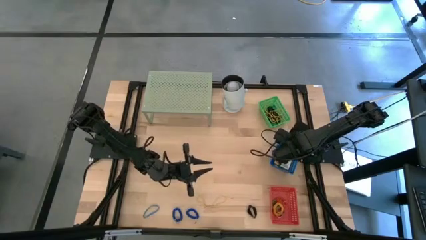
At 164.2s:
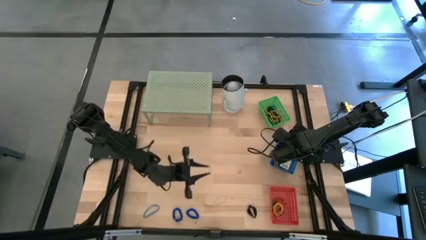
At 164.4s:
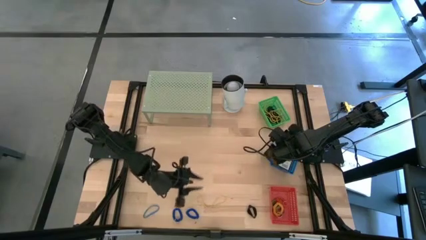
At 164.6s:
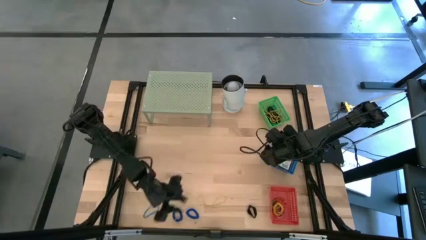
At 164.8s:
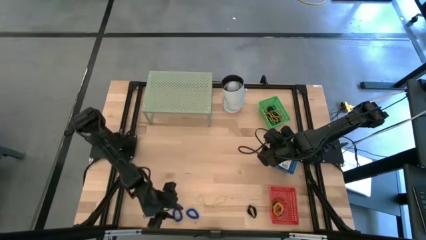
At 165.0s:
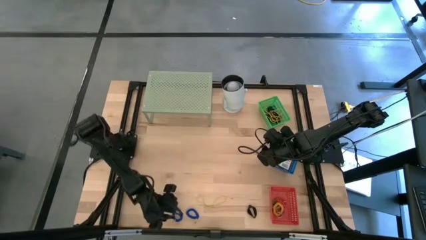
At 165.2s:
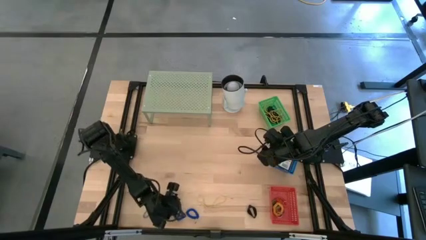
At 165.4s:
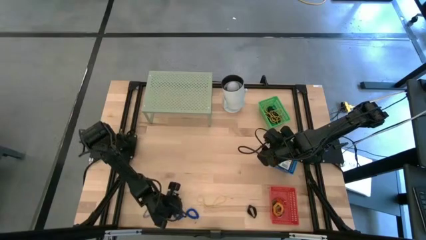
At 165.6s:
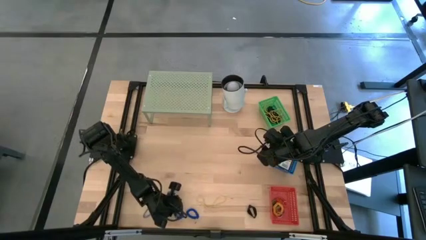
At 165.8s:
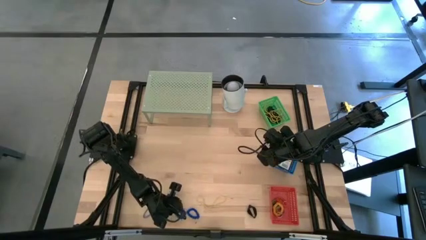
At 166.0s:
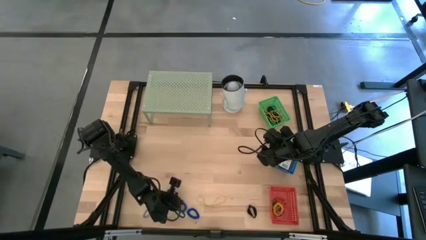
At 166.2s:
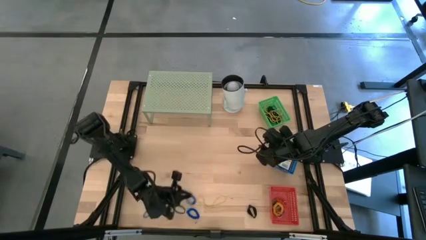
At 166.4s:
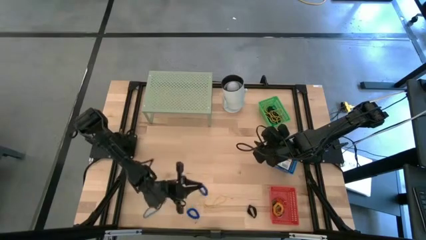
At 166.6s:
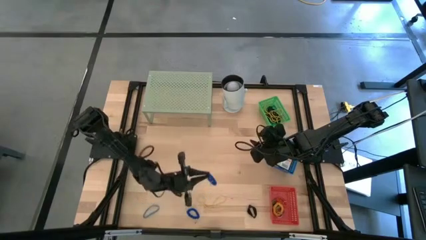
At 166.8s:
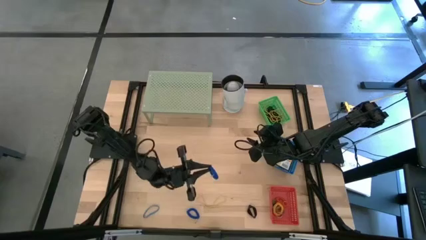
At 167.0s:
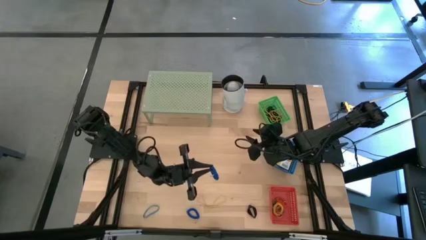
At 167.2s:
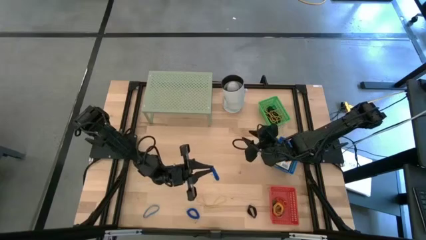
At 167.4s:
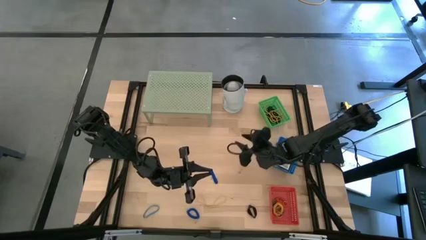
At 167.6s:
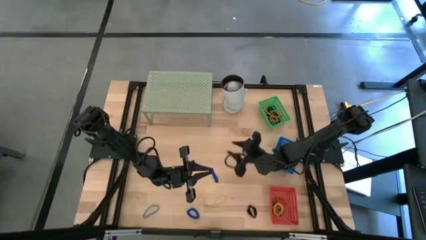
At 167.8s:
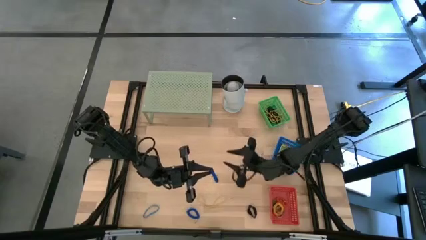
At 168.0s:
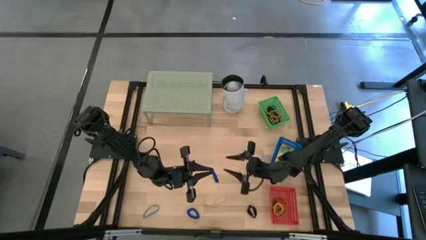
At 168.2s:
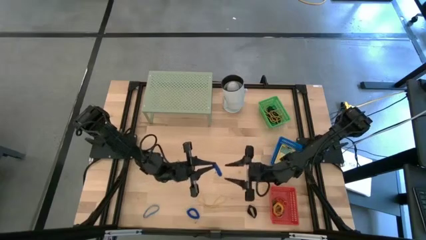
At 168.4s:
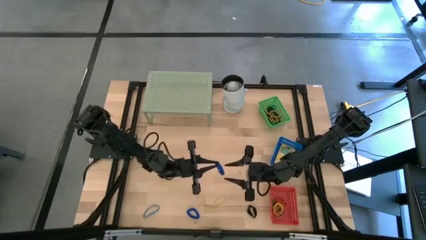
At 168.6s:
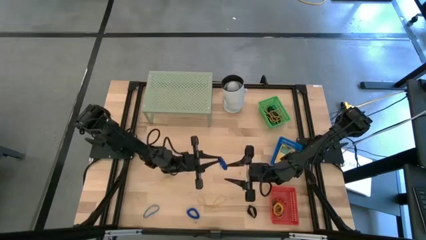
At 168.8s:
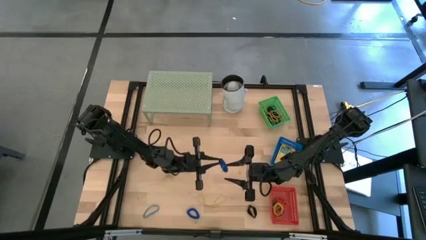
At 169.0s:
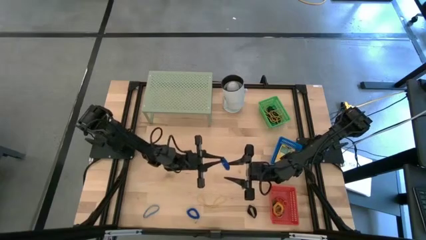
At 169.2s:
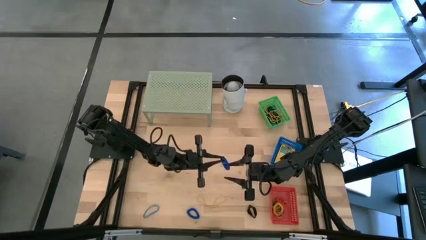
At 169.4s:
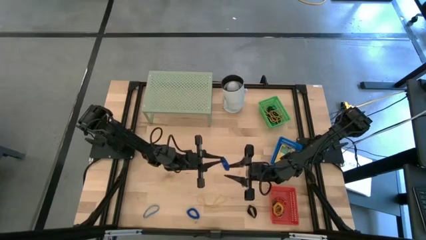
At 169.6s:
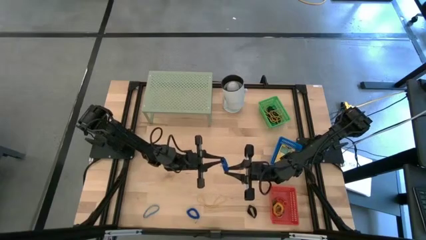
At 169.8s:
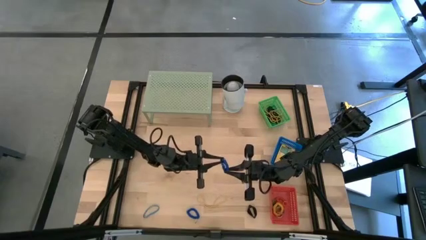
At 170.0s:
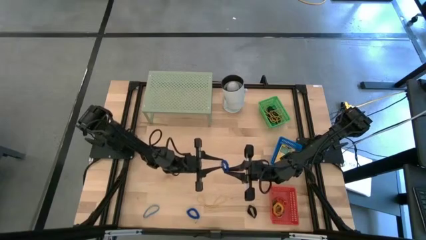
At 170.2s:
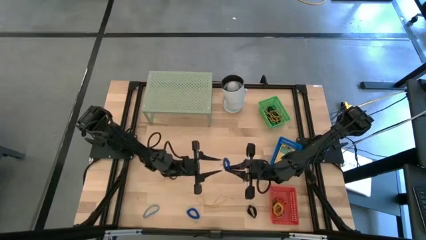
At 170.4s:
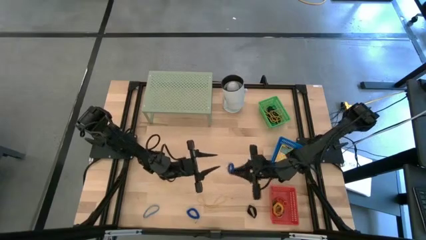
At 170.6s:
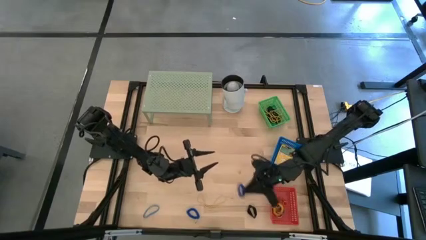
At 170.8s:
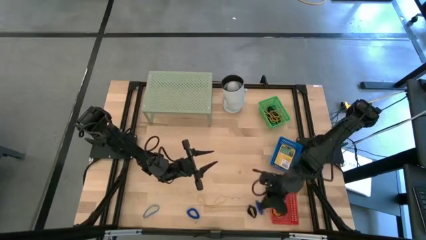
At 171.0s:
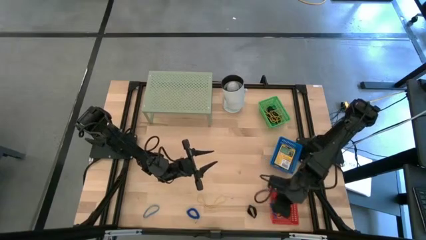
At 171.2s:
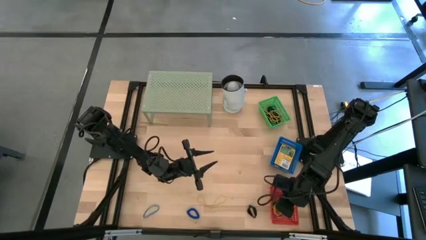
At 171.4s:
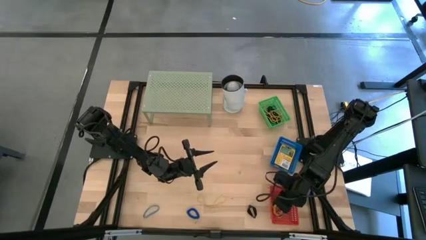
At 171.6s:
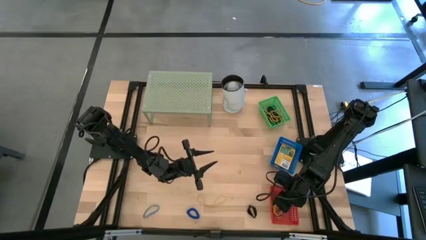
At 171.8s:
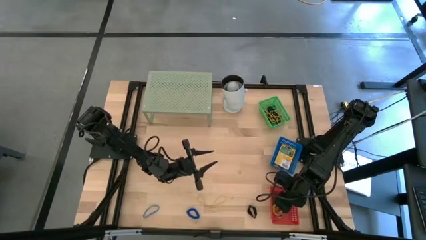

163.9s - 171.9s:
Task: Pick & Place Office Desk Supplies
Put the blue spiral keychain into the red bin

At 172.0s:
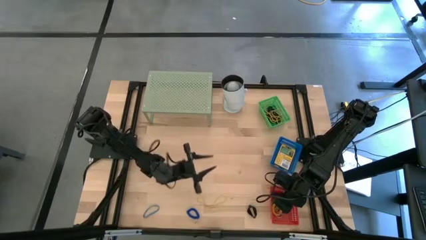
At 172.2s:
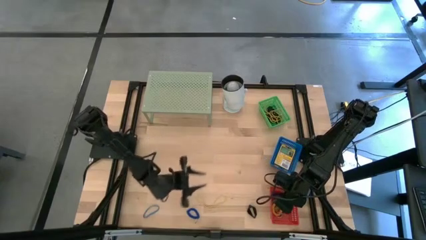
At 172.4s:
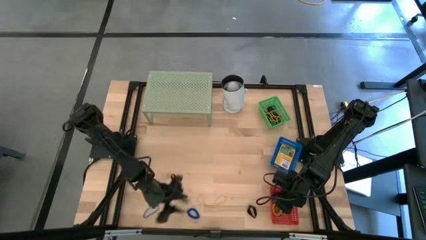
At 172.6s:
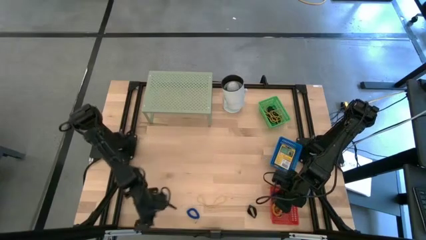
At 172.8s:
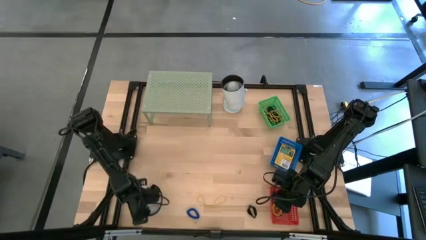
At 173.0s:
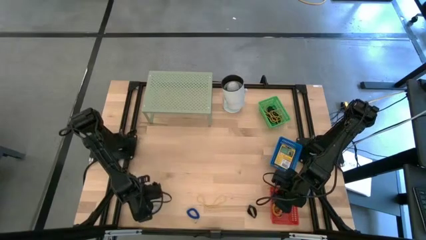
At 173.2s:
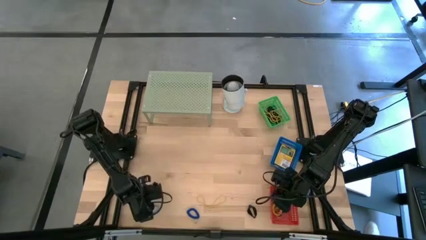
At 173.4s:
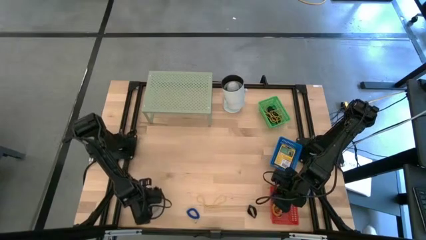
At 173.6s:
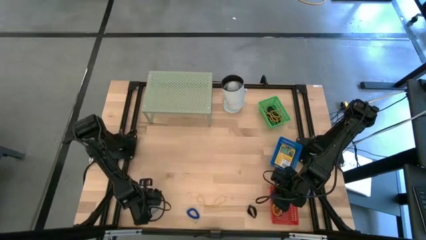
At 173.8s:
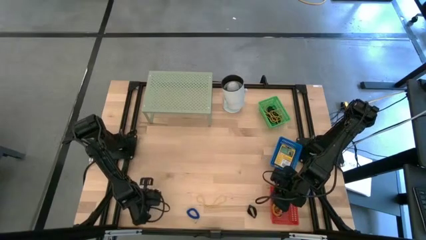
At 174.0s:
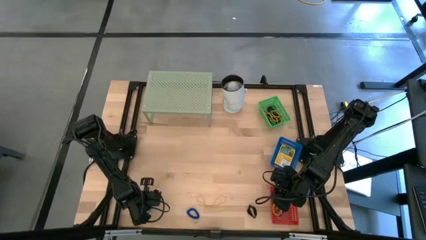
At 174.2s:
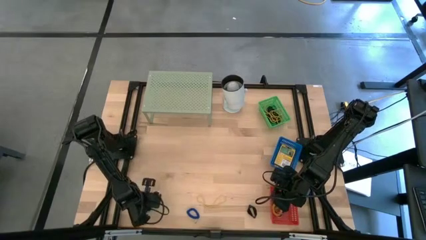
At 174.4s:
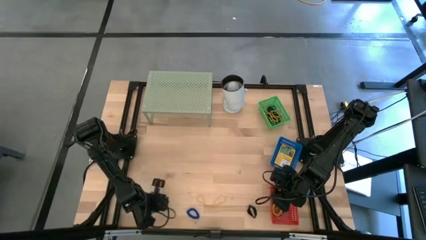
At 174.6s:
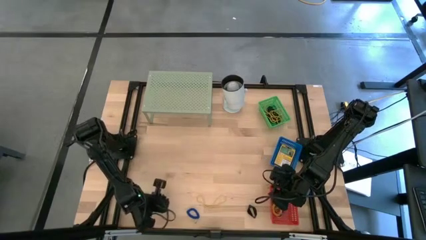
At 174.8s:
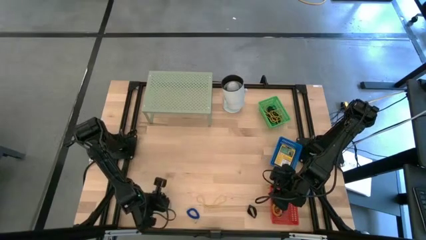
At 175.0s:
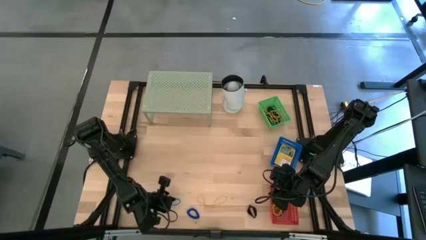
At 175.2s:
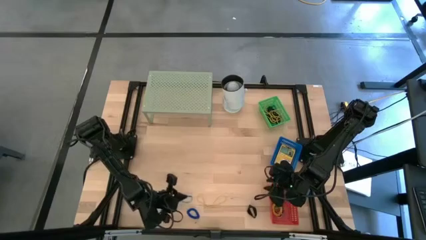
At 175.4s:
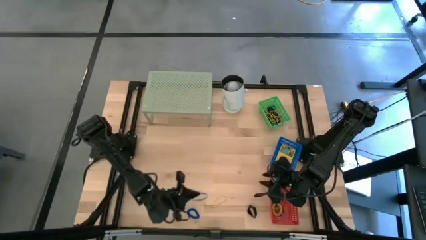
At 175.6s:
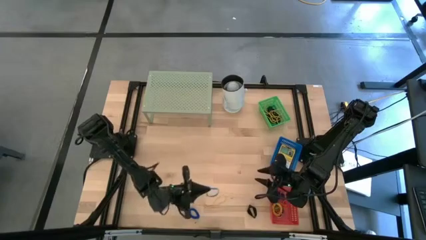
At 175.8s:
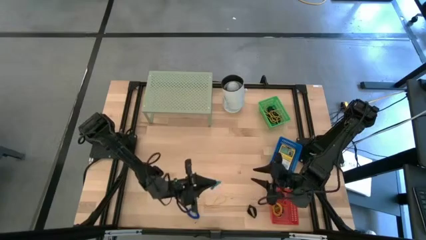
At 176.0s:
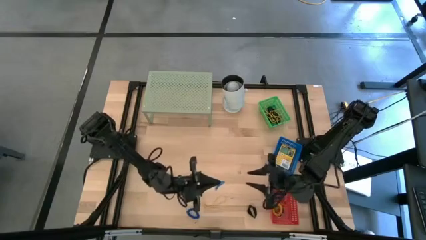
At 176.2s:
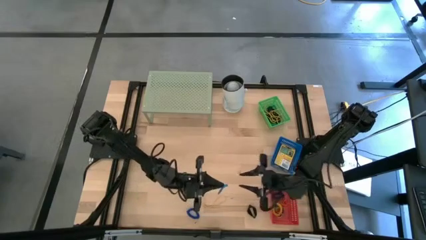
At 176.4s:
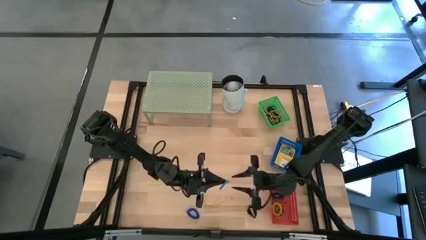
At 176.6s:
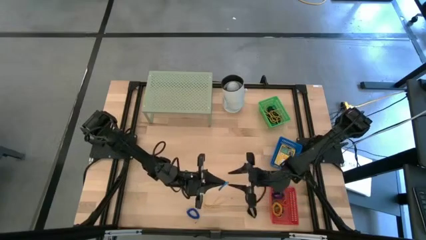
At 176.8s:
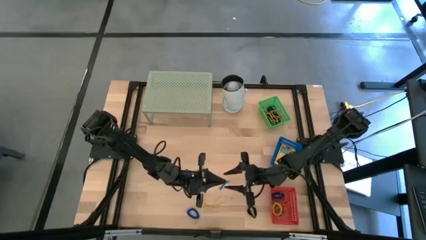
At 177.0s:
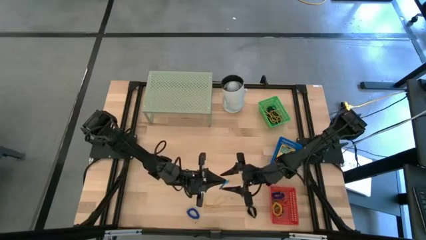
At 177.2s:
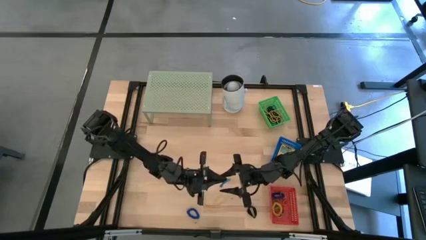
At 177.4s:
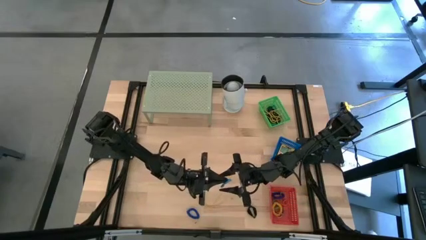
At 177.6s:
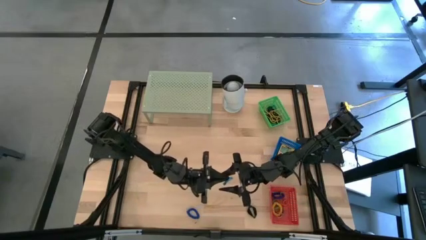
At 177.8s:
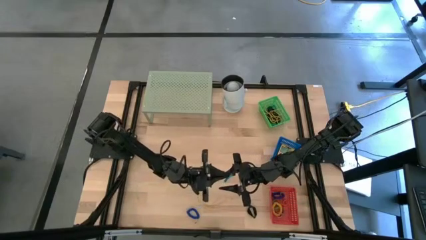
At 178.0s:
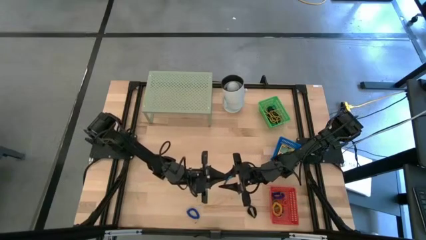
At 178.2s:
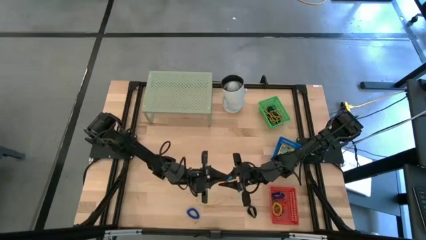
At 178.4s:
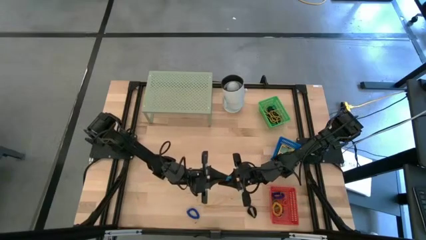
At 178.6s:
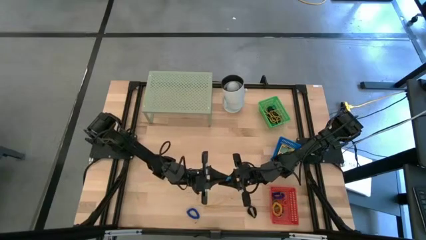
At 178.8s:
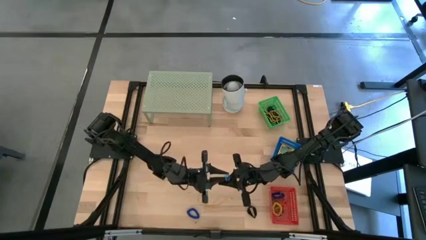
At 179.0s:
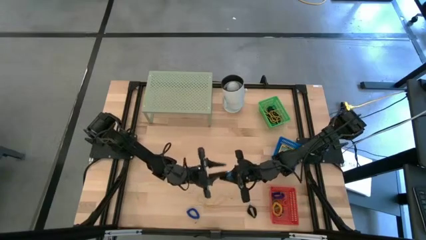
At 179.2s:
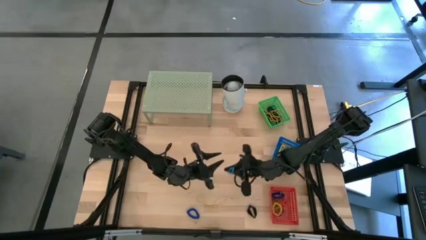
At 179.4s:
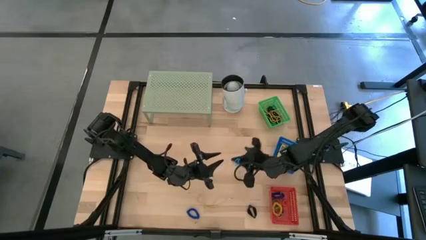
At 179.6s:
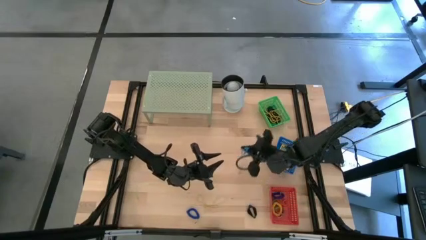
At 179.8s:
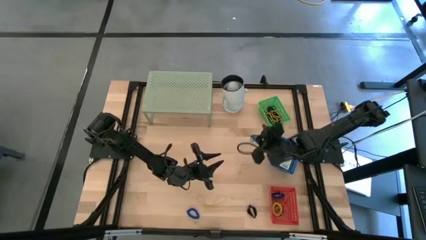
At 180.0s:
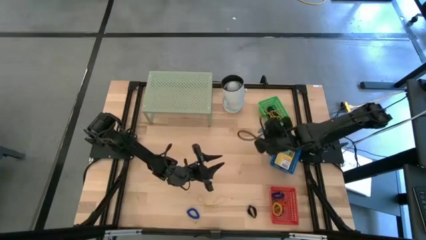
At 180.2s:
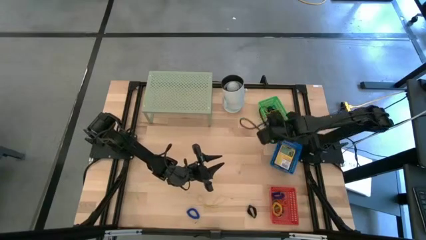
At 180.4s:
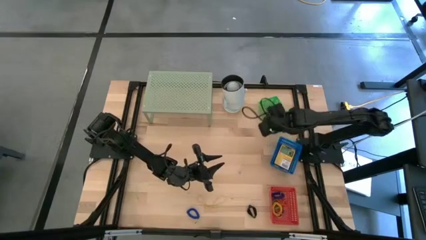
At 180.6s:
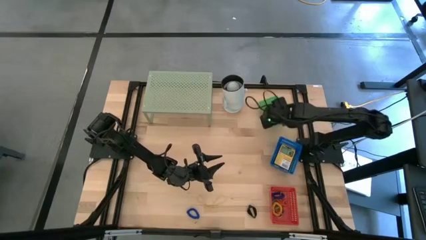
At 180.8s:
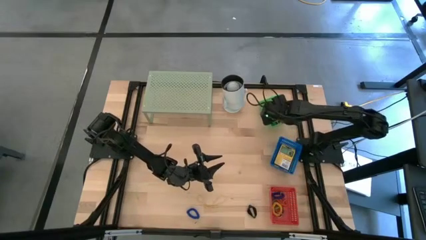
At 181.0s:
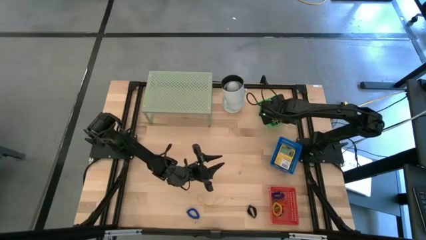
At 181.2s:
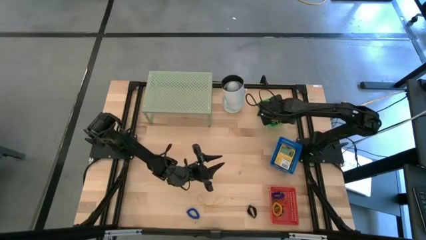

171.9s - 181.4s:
Put the blue rubber band into the green bin
